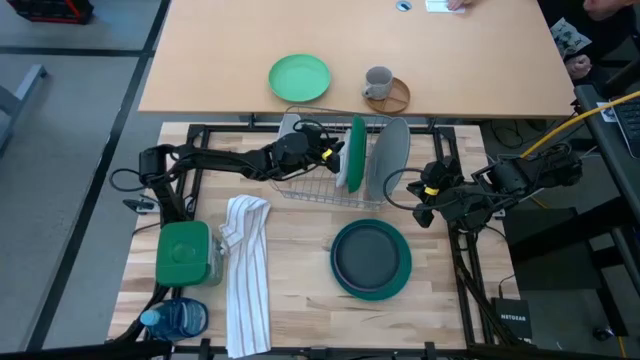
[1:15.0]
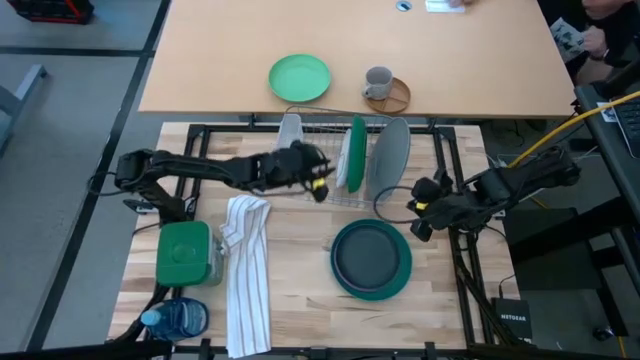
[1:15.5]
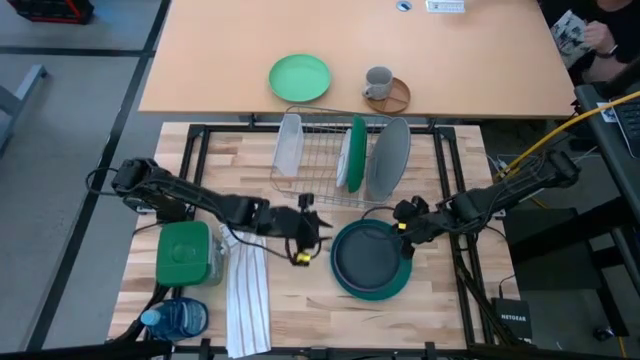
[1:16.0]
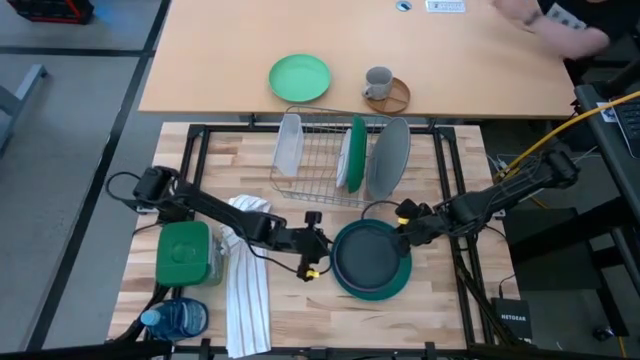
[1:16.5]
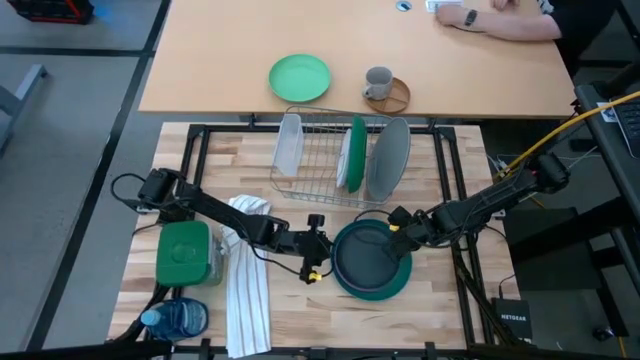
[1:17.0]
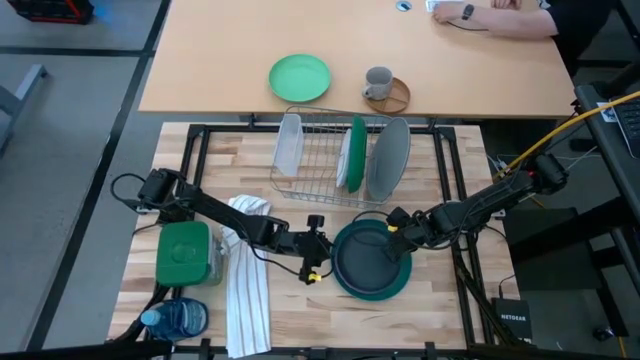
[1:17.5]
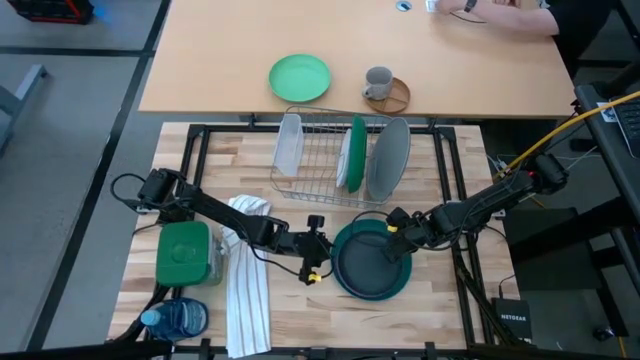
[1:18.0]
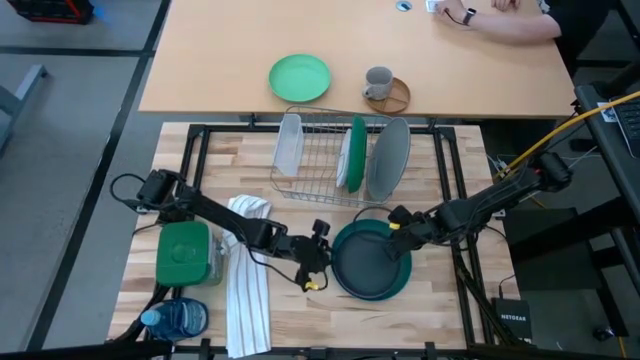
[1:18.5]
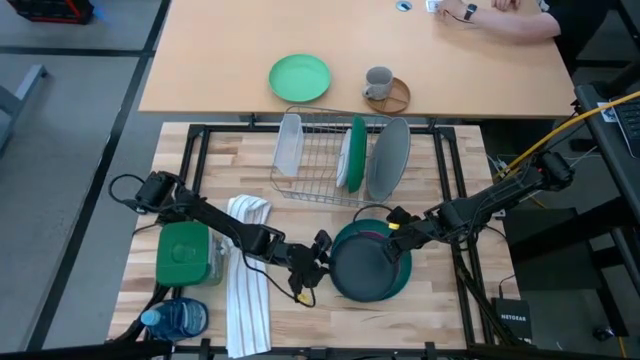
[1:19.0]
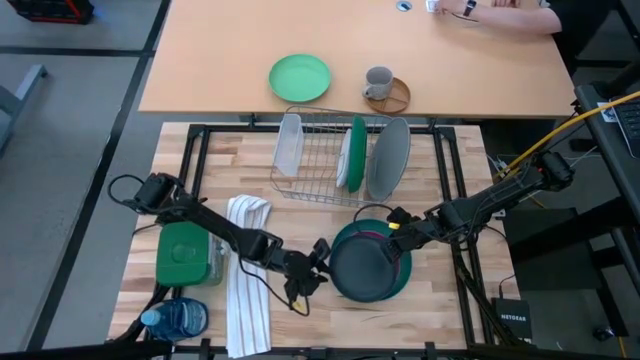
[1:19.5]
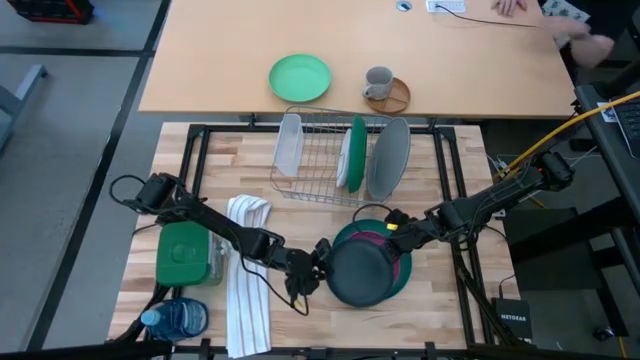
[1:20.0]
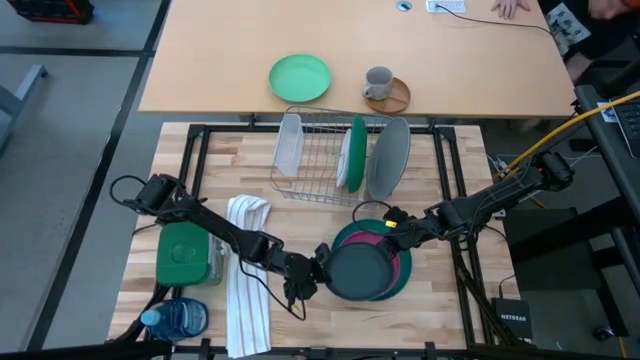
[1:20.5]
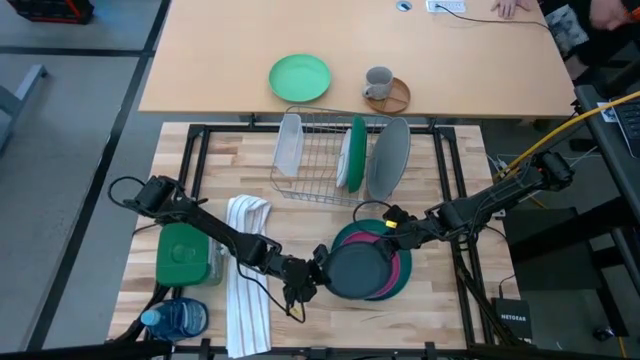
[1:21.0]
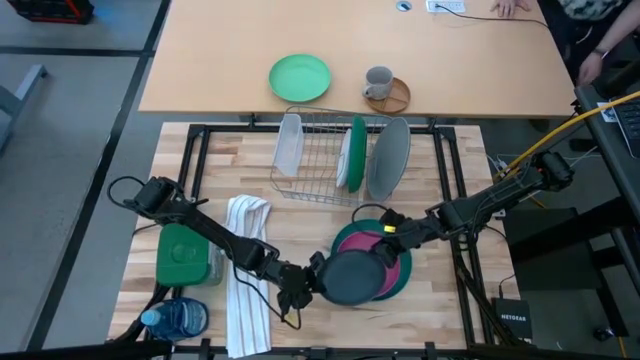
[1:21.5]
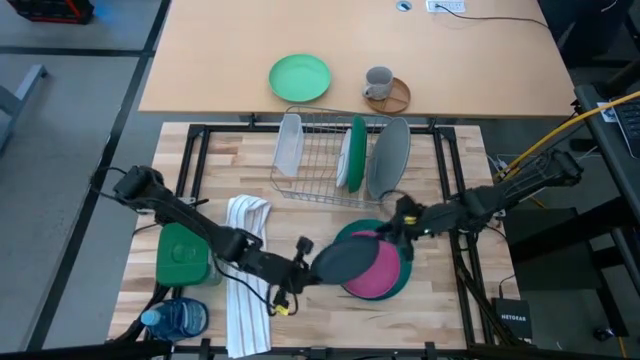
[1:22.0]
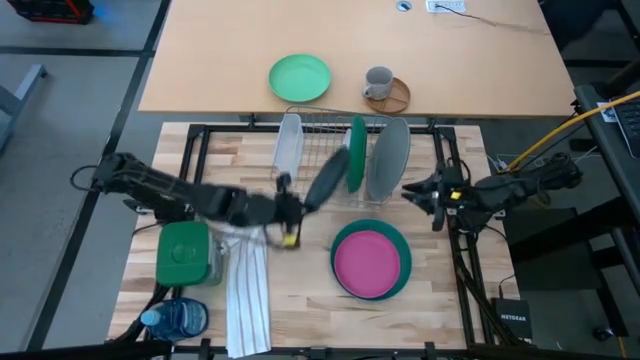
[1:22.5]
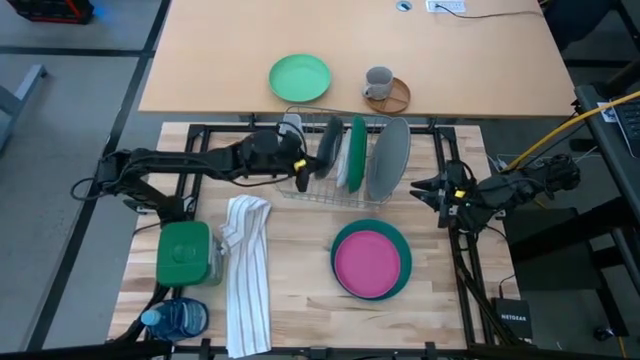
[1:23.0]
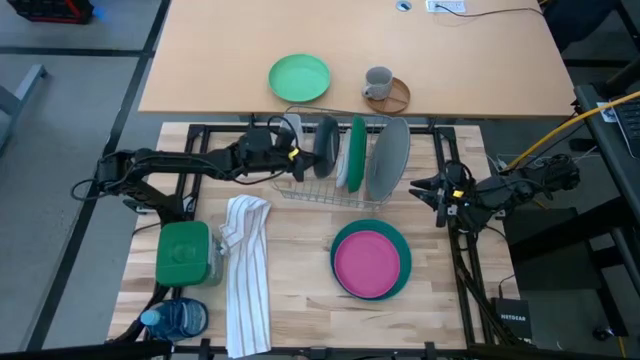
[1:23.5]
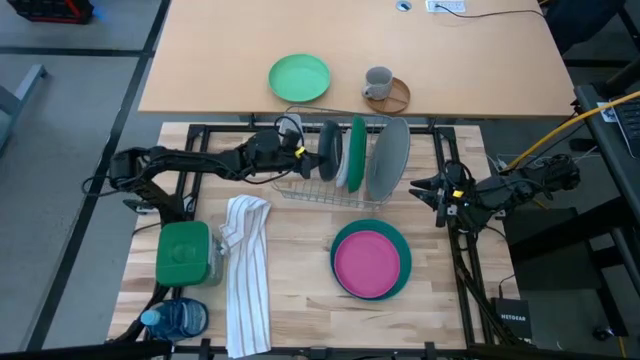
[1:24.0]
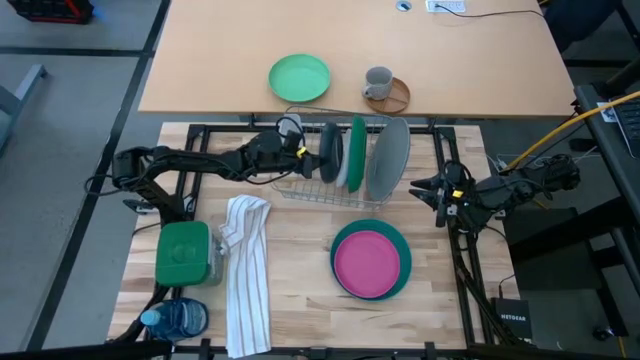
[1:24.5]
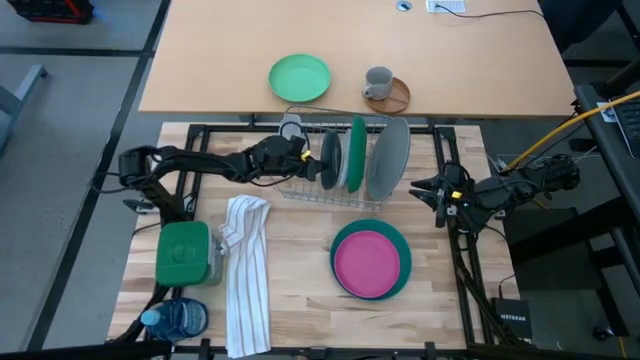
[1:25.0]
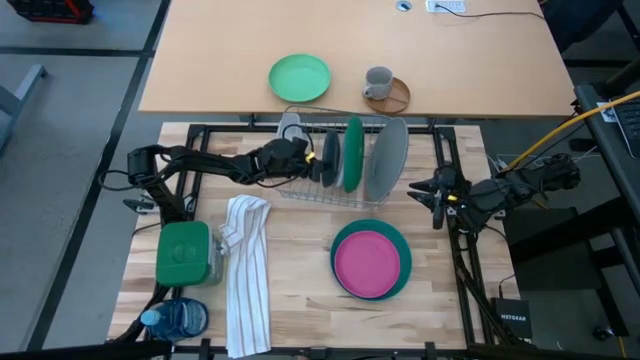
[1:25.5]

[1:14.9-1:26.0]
Task: Sort dishes
Put the dark blue plate in the dish rack

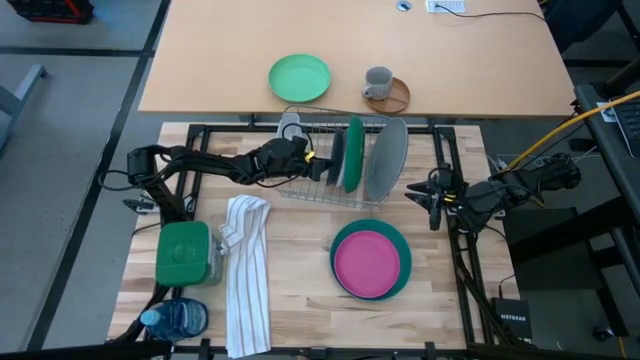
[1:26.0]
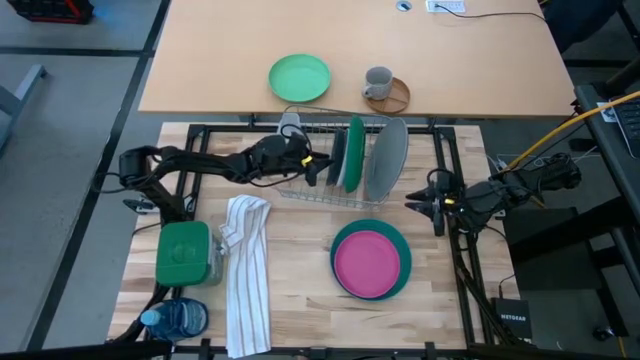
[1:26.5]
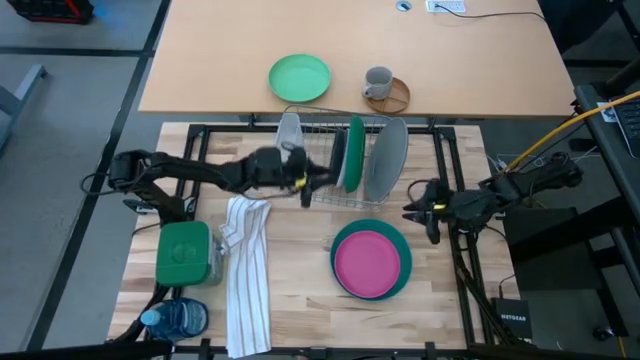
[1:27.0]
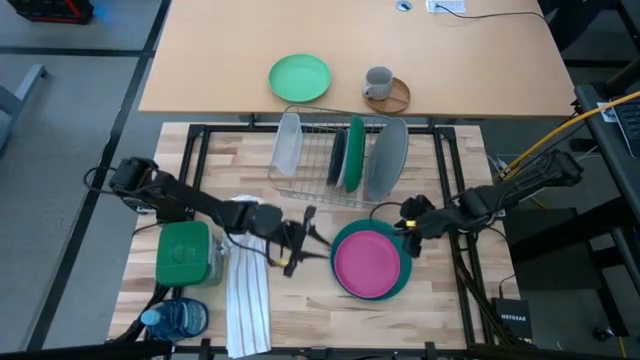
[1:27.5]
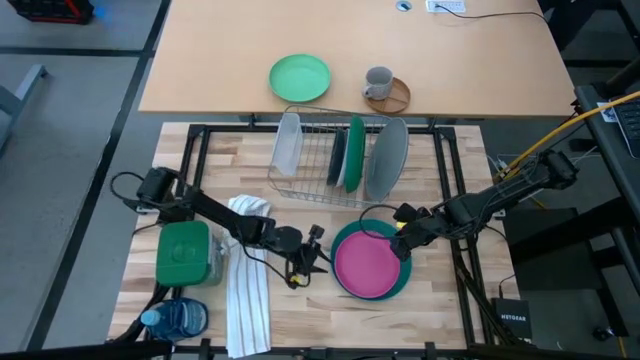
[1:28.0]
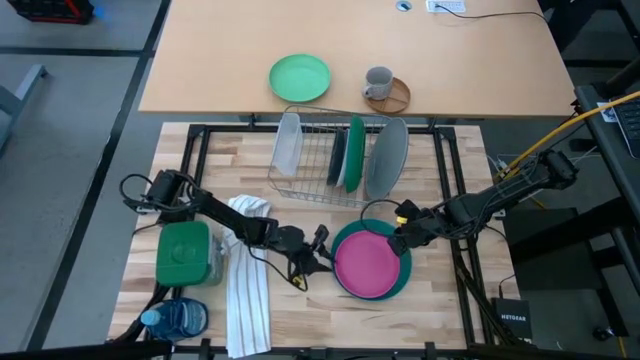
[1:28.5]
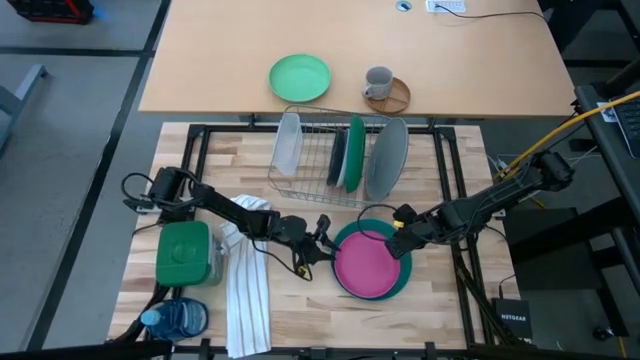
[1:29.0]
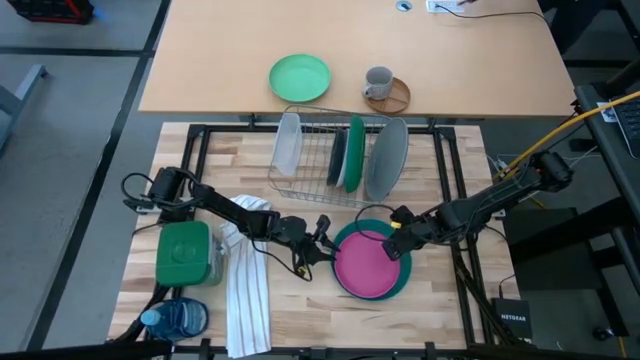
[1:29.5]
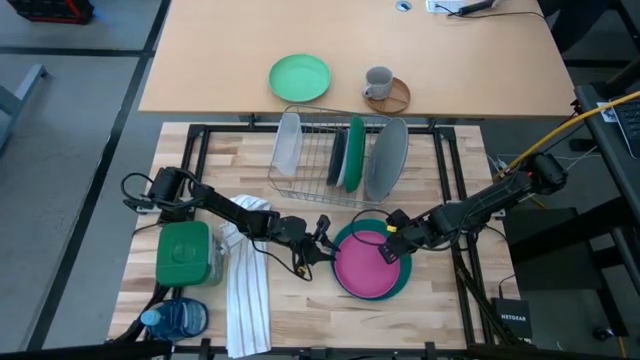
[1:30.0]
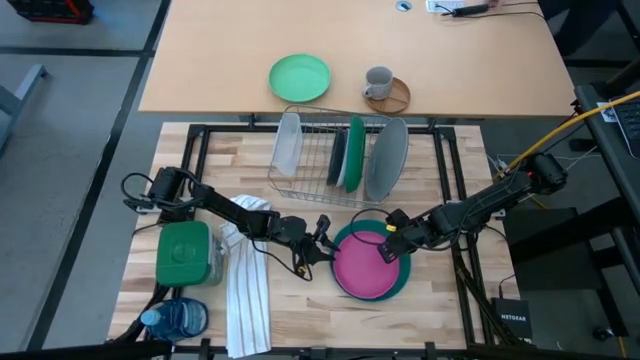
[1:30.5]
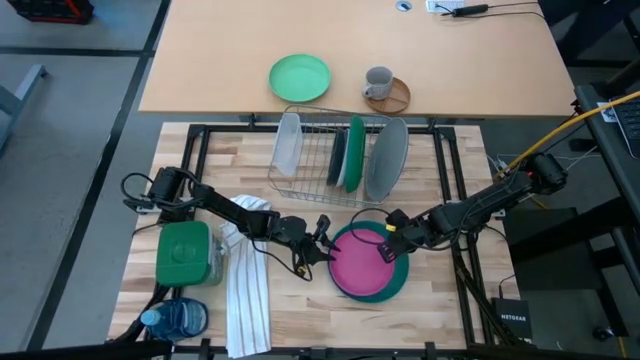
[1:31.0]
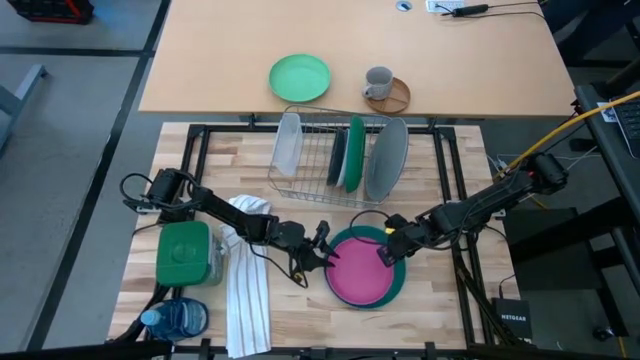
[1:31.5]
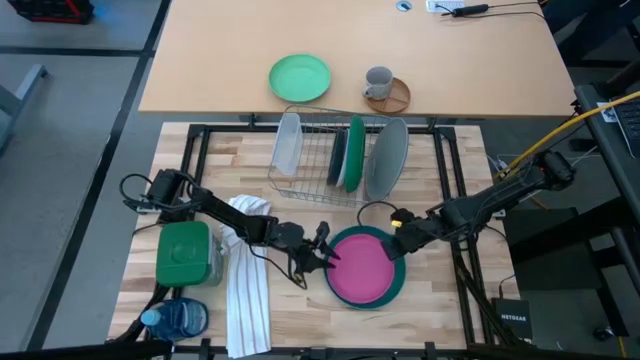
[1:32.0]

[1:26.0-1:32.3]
Put the pink plate in the dish rack

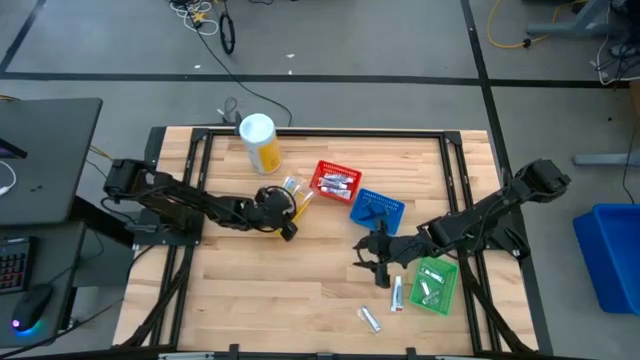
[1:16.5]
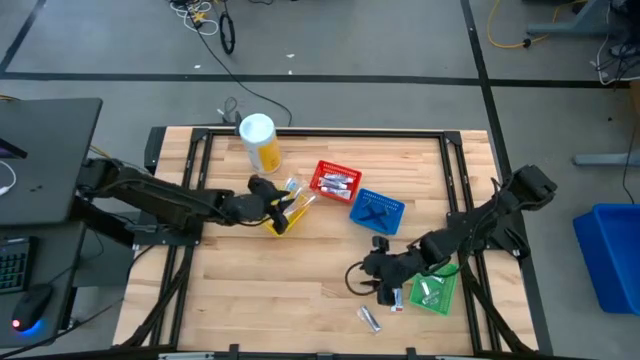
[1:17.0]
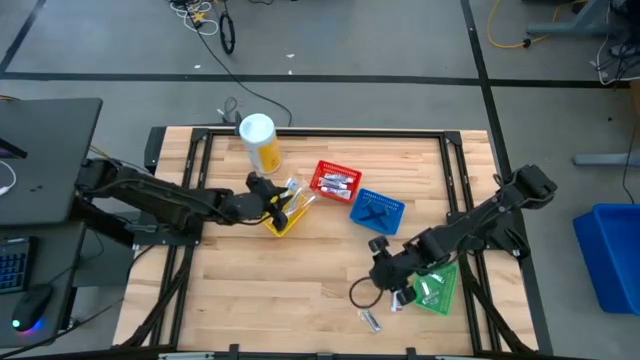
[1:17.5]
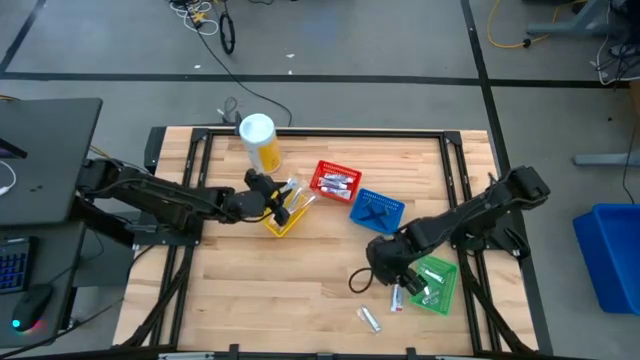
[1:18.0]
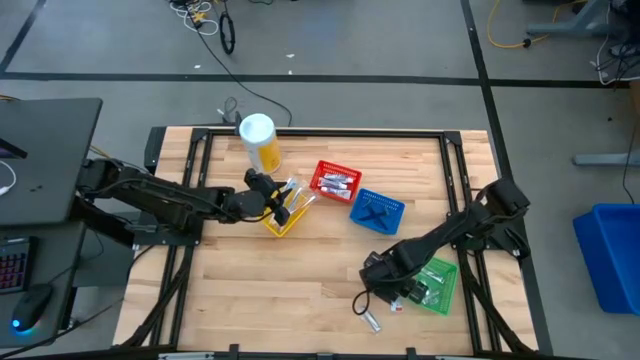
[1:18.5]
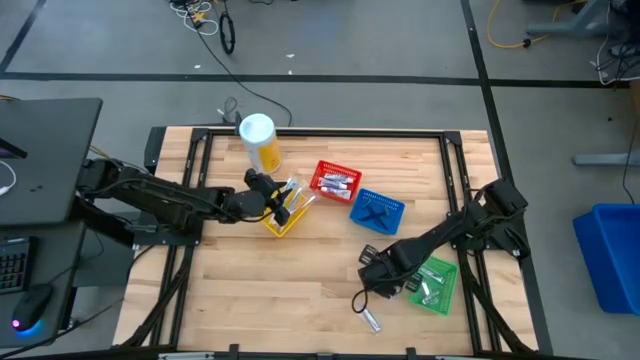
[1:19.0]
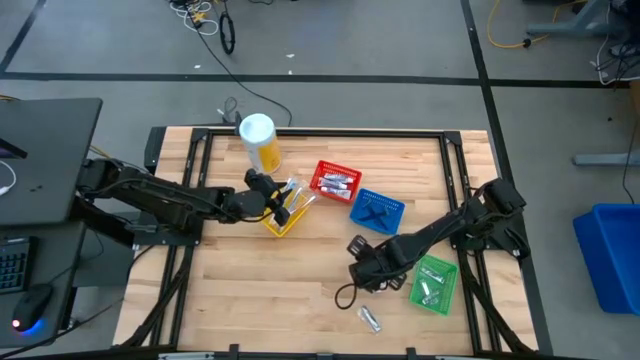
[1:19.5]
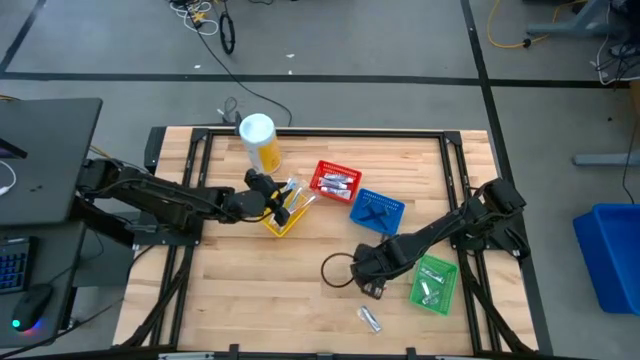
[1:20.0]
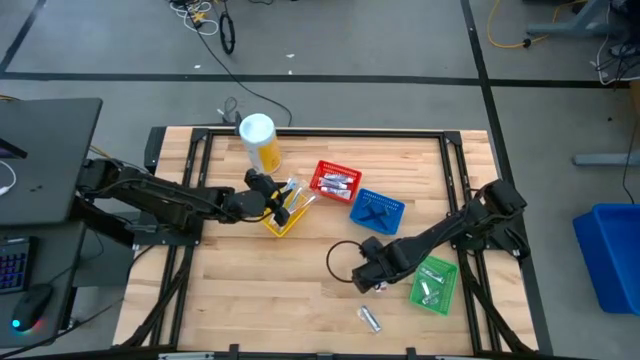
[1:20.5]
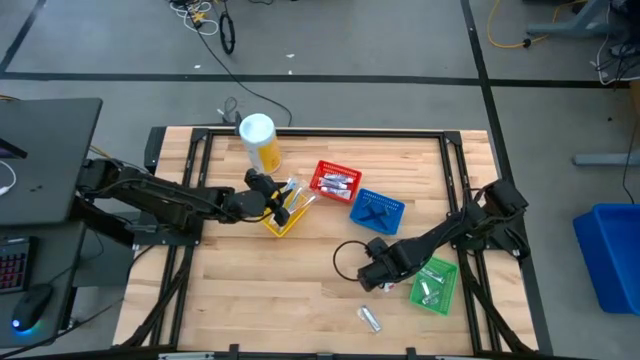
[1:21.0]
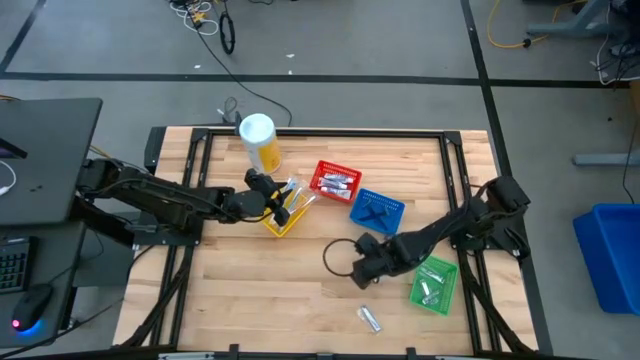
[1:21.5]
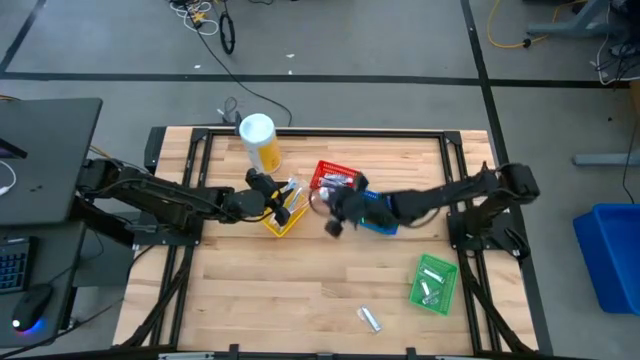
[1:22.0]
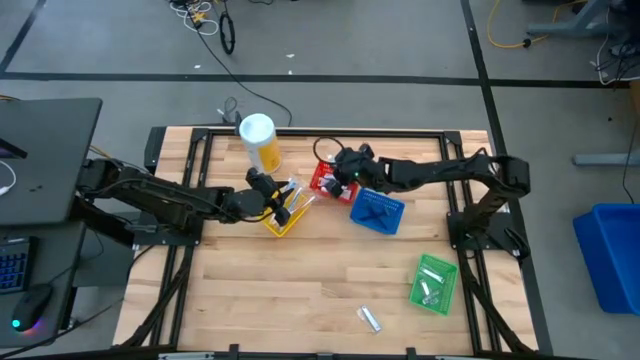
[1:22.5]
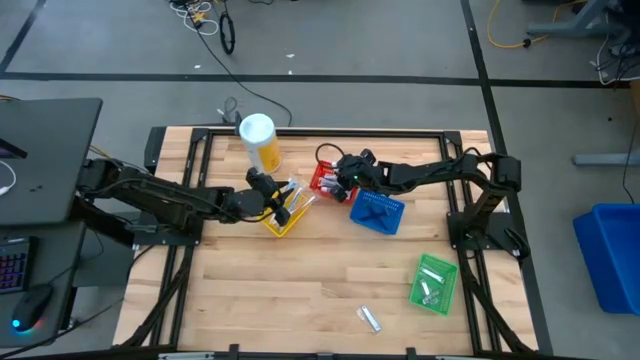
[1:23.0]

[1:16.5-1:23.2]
Task: Pick & Place Travel size toiletries
Put the white toothpaste into the red bin
